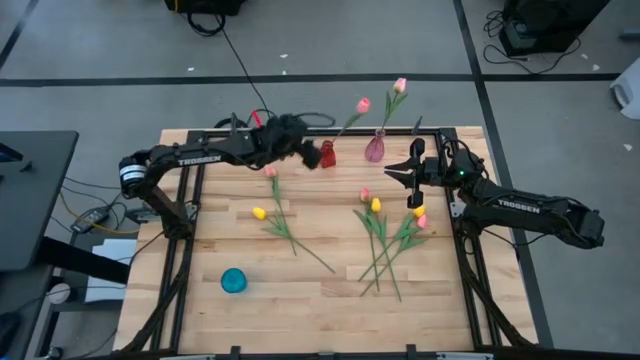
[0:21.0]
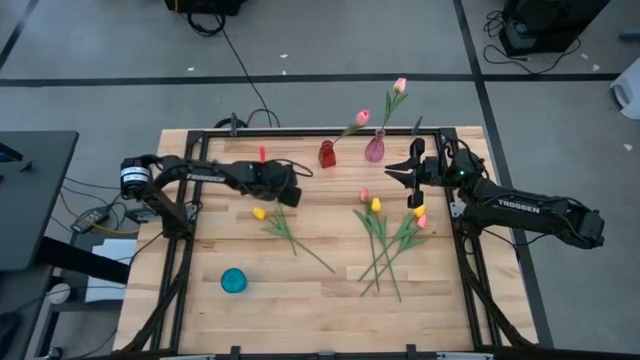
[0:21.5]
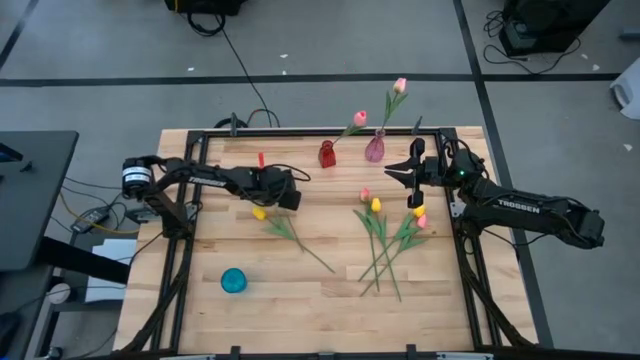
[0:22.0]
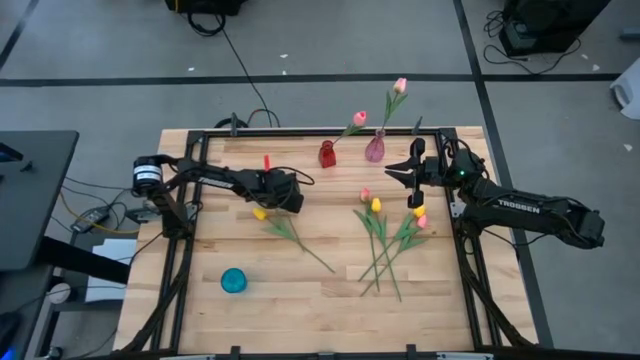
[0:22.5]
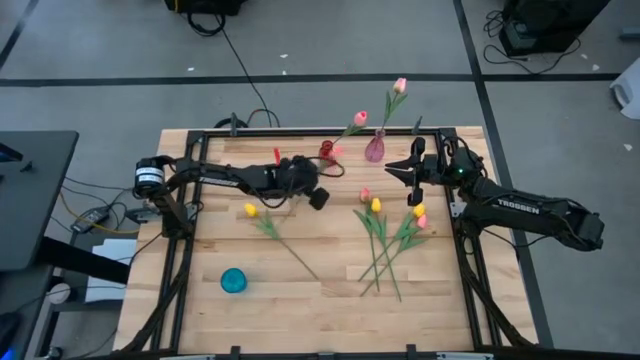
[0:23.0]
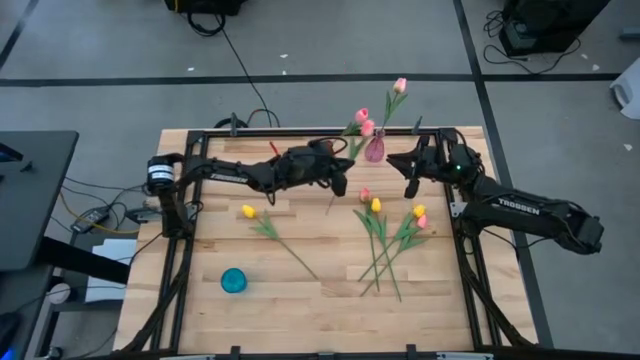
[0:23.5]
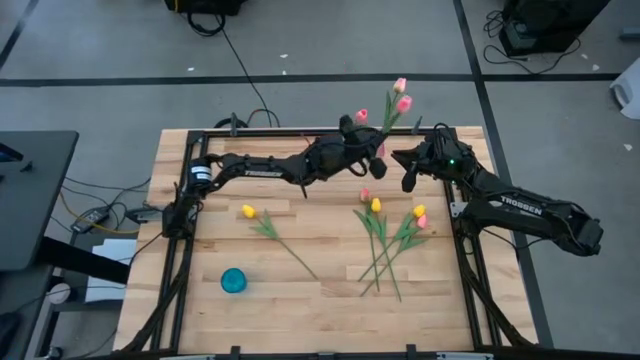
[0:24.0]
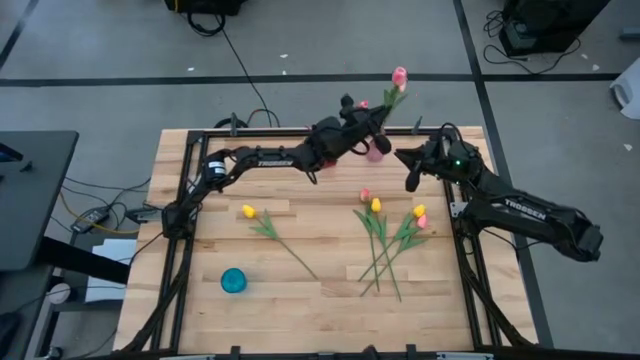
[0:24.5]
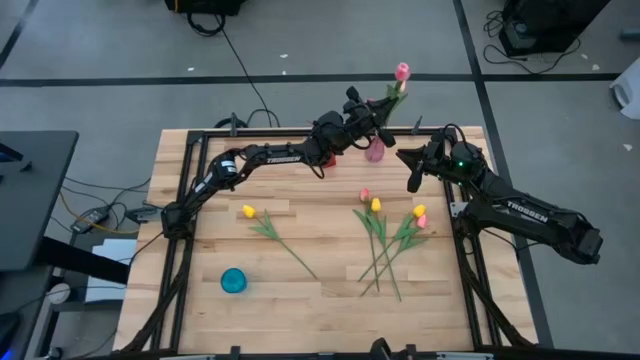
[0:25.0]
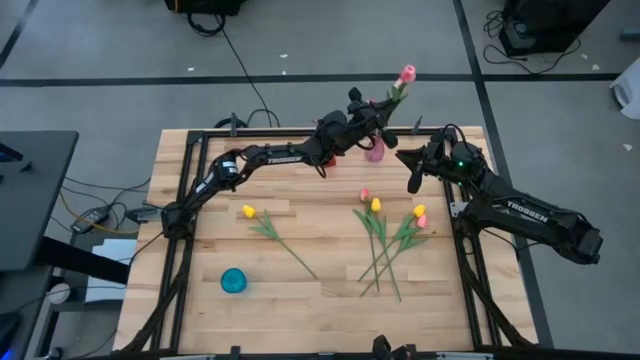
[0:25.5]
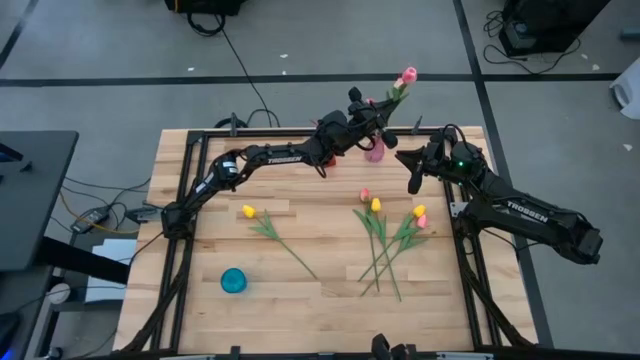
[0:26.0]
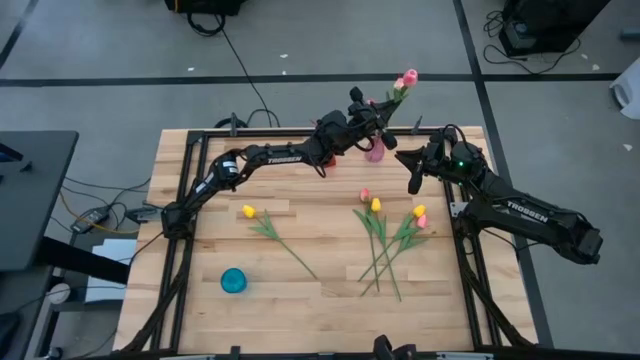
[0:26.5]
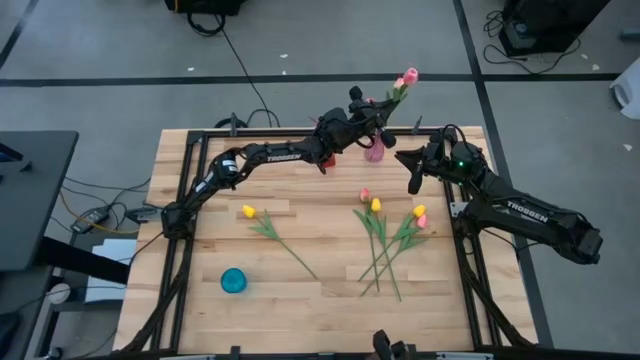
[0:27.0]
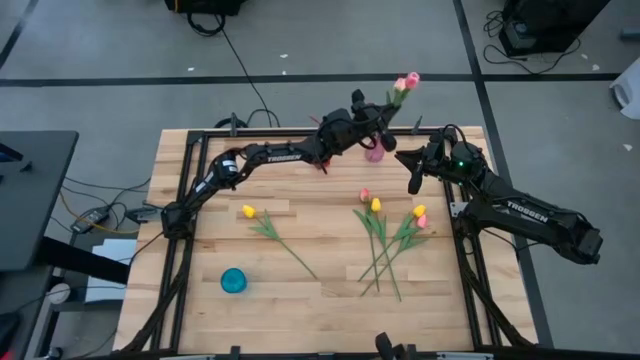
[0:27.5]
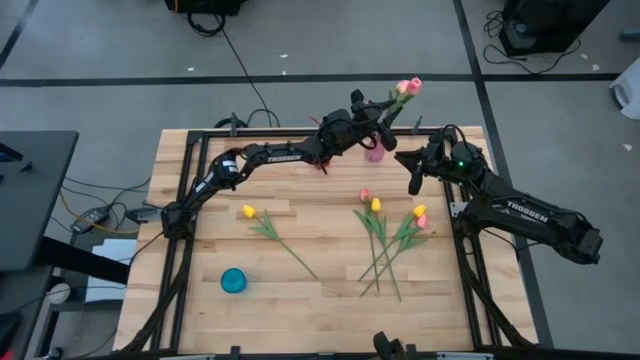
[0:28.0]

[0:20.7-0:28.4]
Task: Sort flowers into vase by color
Put the pink white tulip into the pink vase

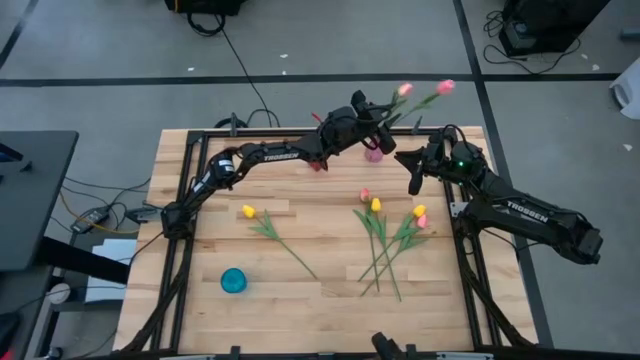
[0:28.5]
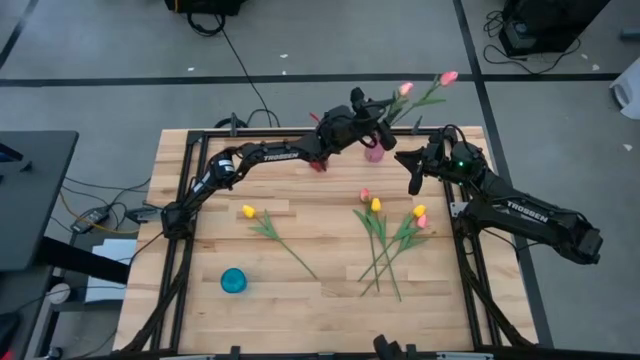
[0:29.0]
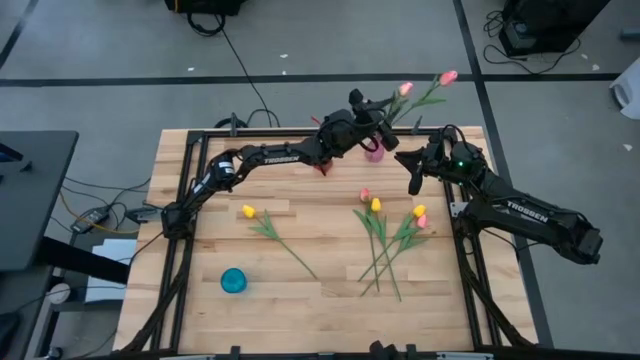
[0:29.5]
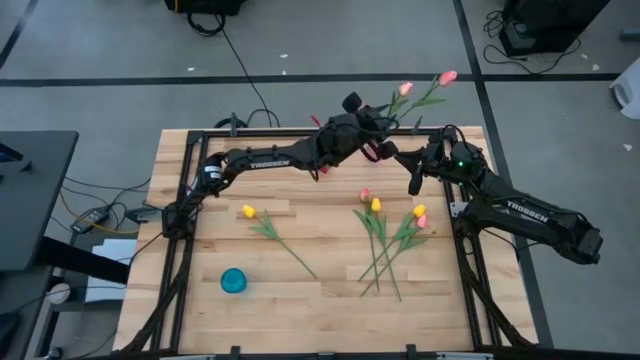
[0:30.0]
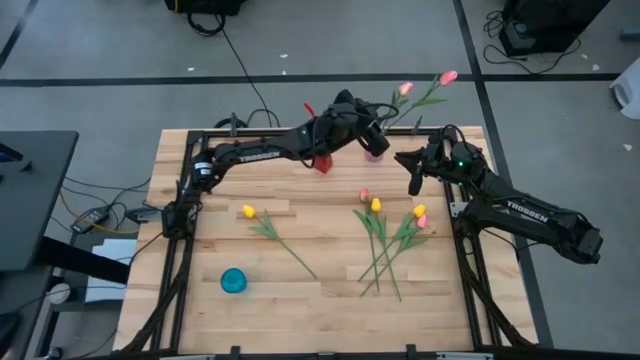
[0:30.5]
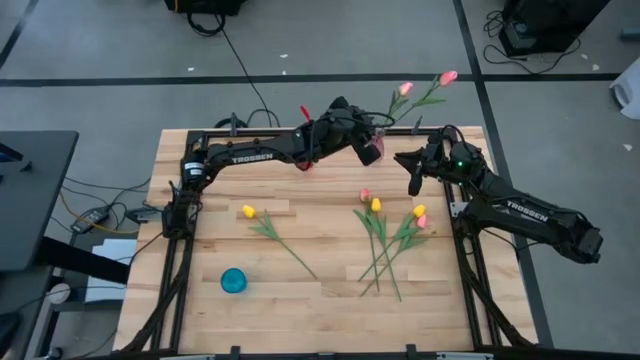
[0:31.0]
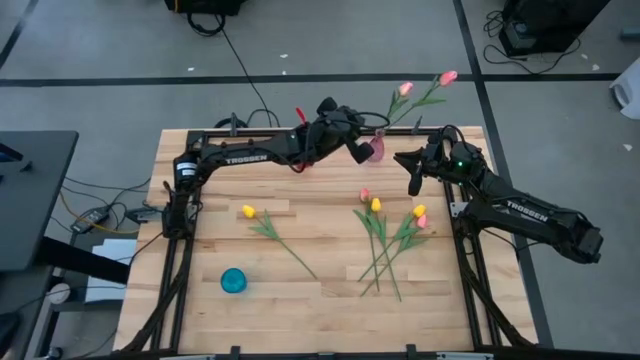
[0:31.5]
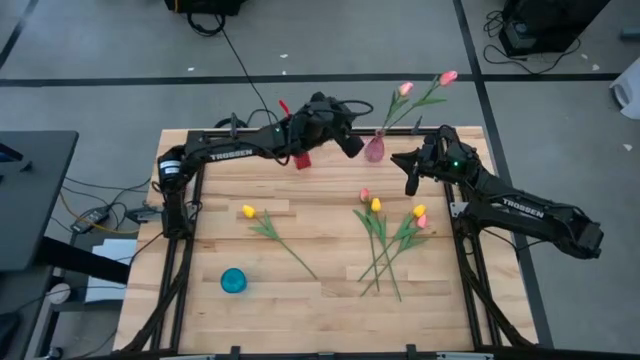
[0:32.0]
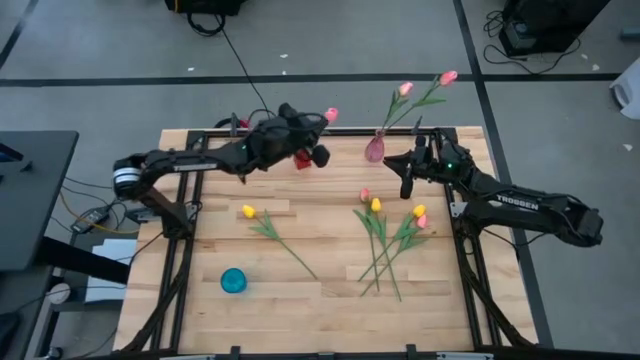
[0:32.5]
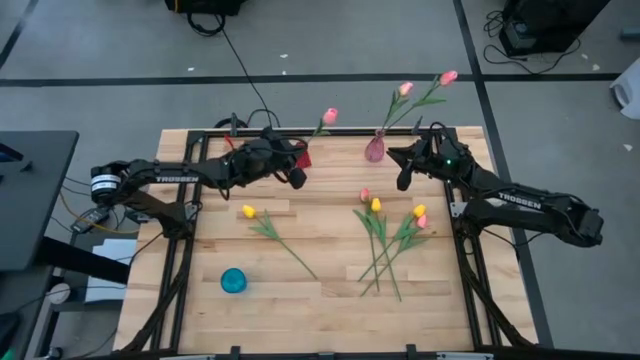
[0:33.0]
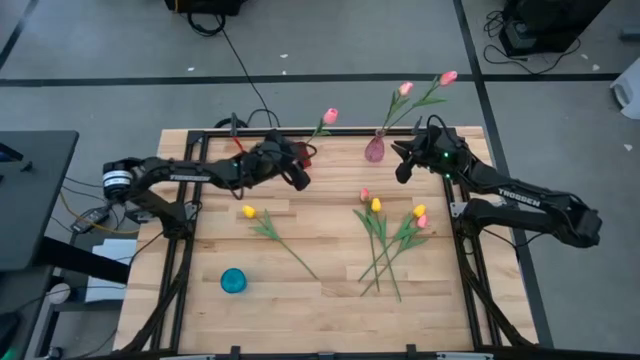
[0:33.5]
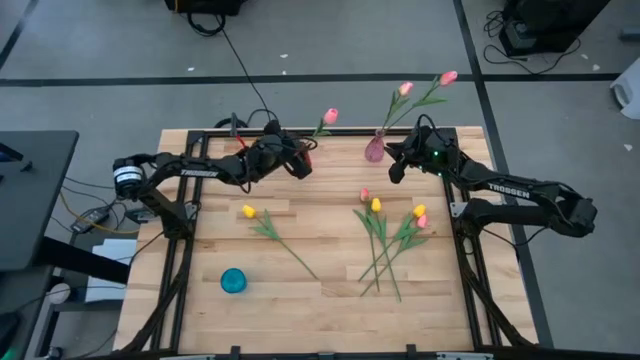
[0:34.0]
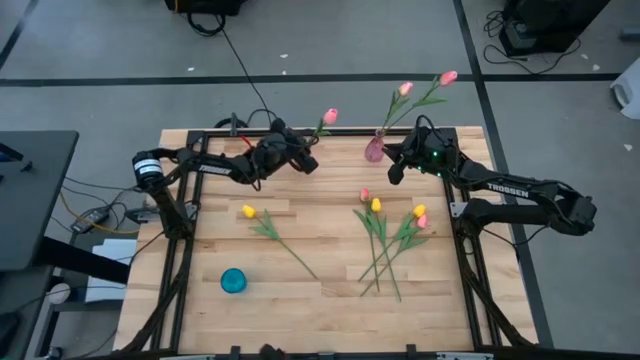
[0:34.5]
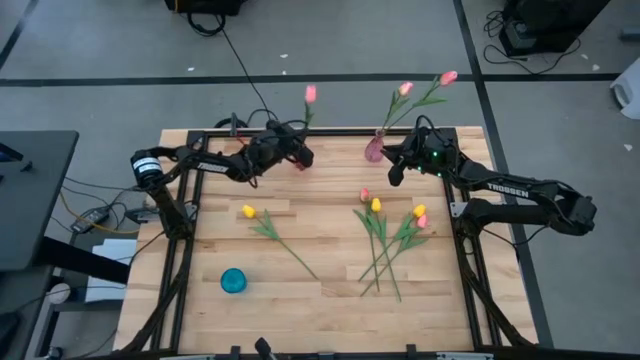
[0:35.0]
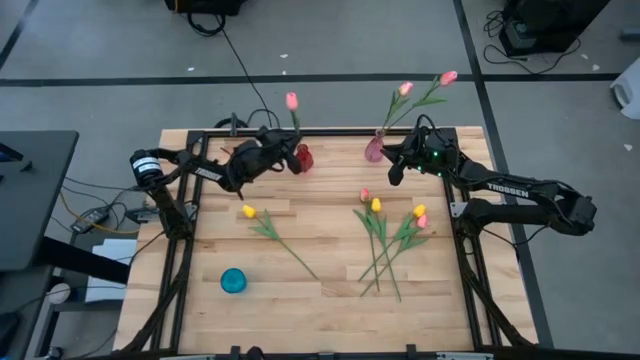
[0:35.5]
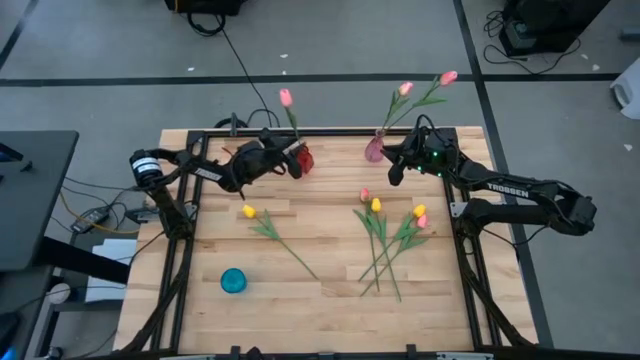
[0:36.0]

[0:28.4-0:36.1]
Adjust the pink tulip in the red vase

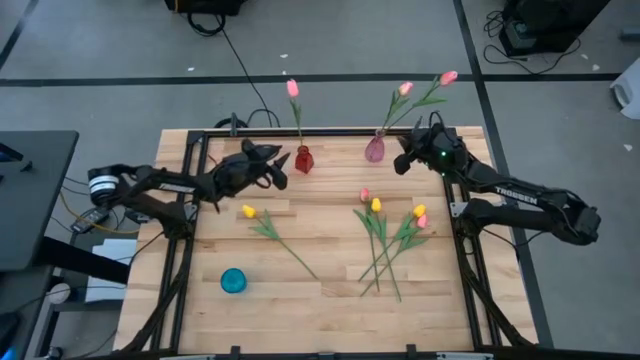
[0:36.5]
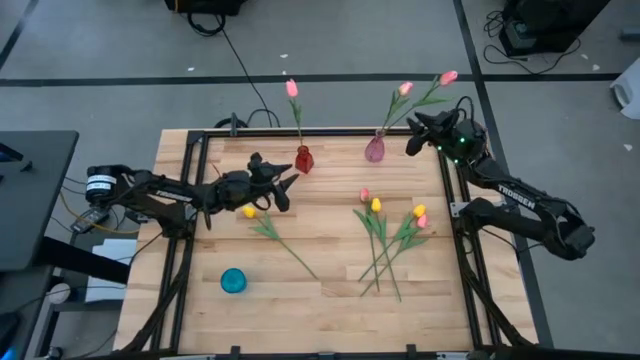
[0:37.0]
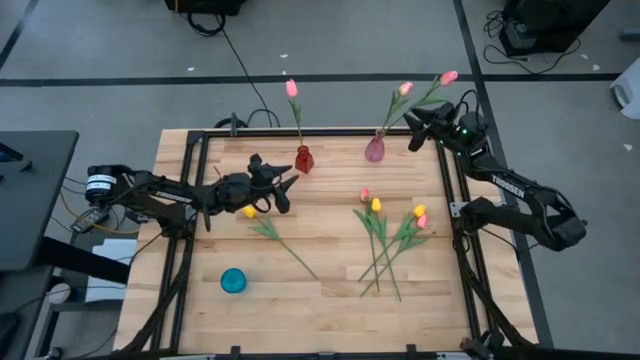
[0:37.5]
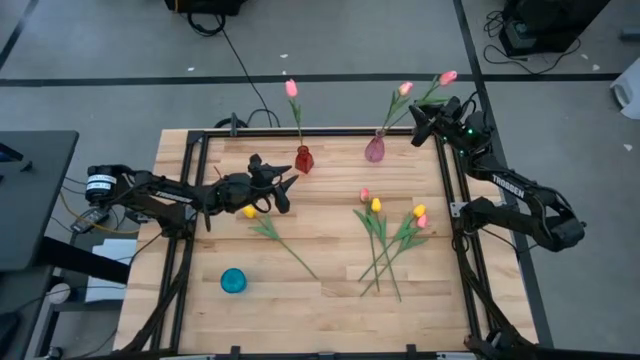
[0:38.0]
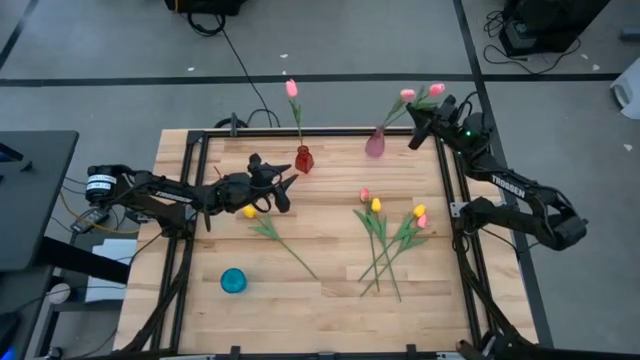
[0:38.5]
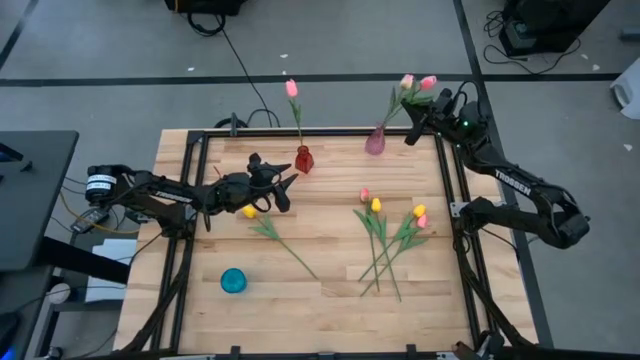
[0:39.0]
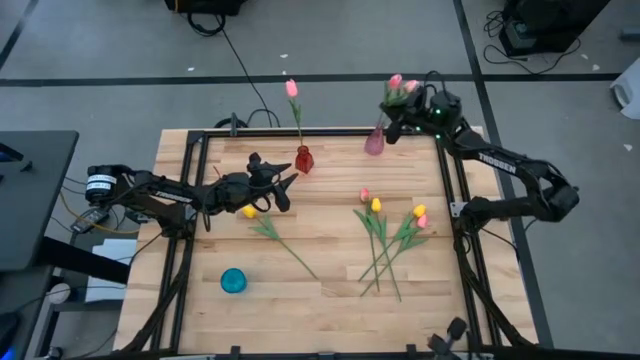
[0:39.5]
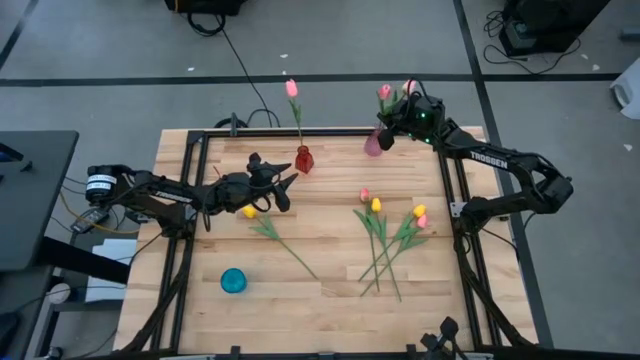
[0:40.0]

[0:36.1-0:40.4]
Adjust the pink white tulip in the pink vase

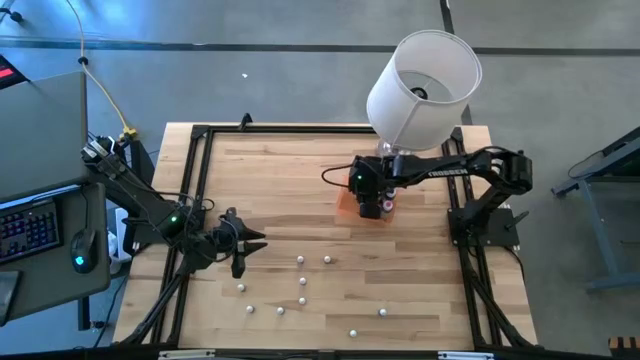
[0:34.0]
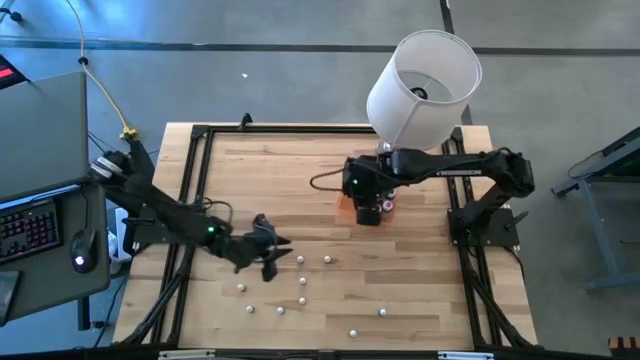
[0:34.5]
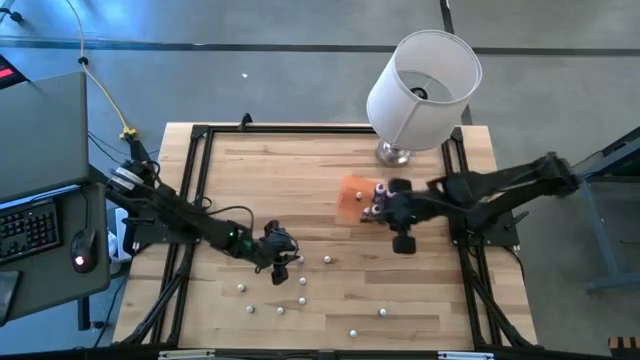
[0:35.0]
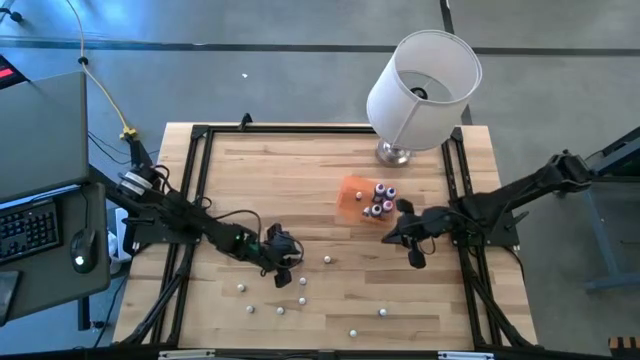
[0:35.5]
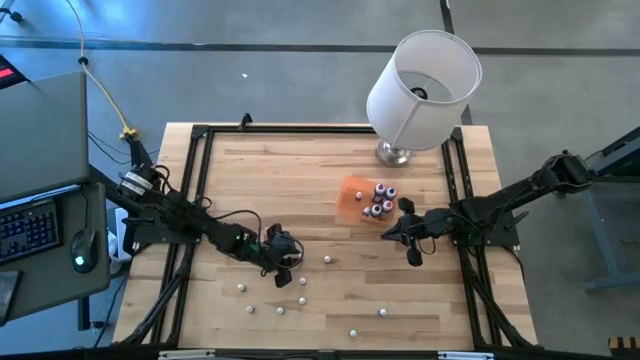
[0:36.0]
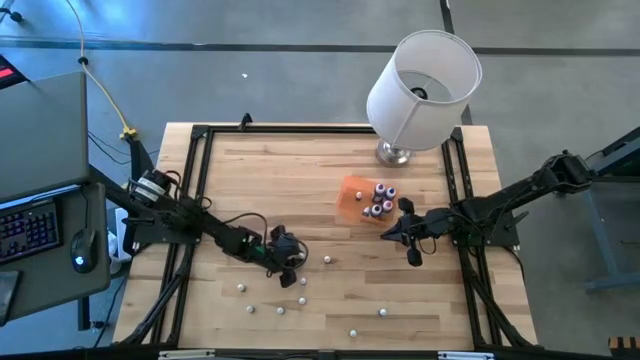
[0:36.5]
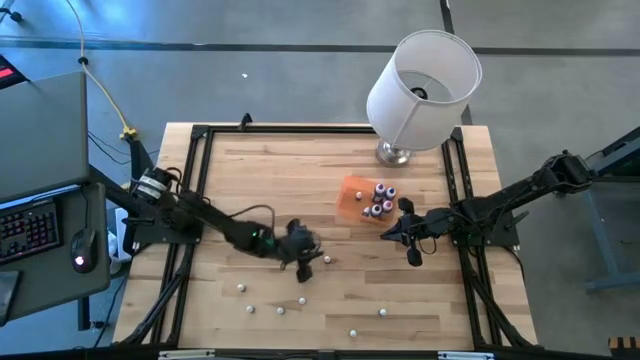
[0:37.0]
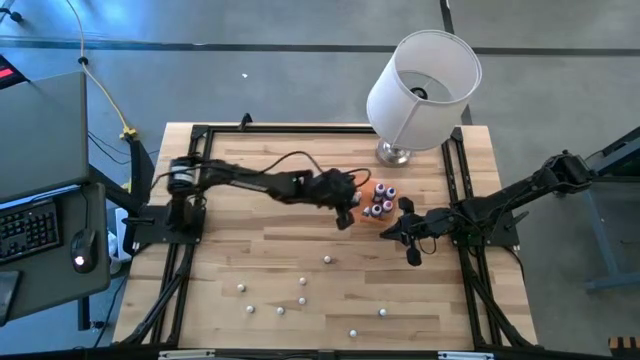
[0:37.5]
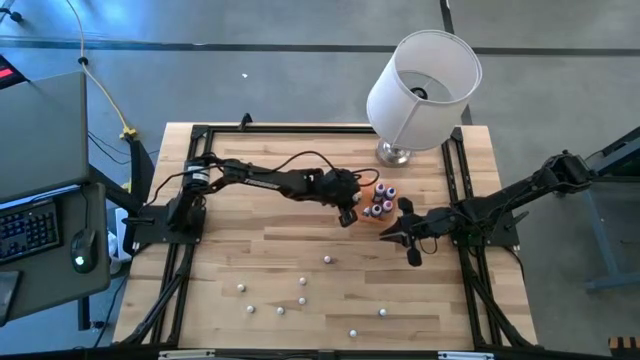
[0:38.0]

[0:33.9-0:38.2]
Task: Pick & Place food coloring
Put the small brown food coloring bottle into the orange container
